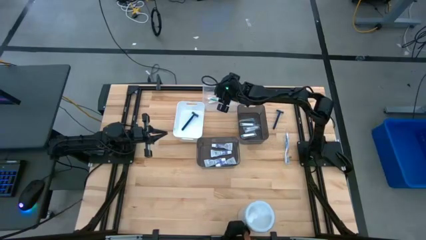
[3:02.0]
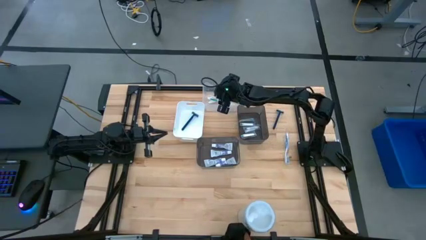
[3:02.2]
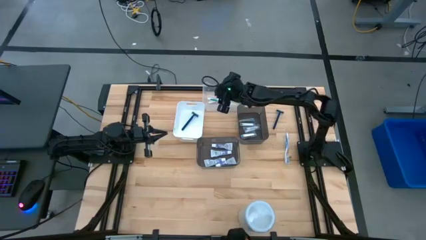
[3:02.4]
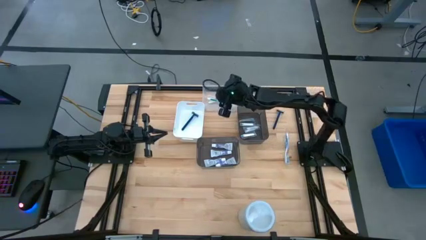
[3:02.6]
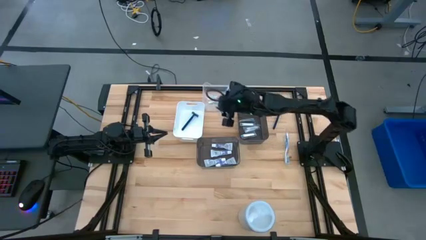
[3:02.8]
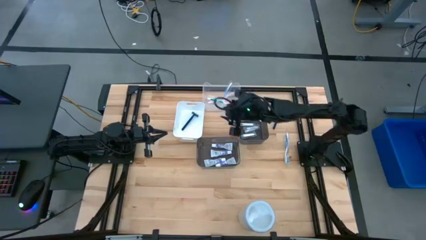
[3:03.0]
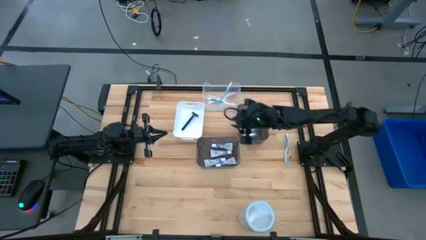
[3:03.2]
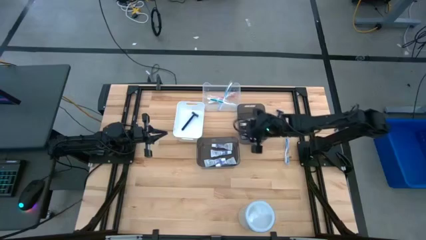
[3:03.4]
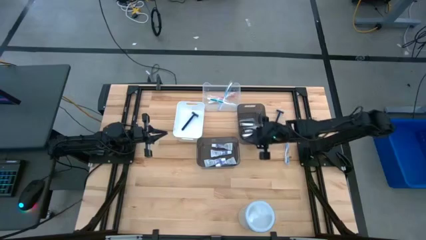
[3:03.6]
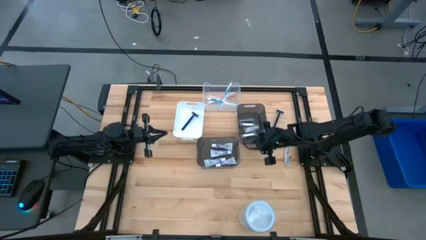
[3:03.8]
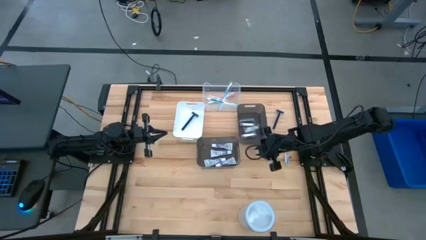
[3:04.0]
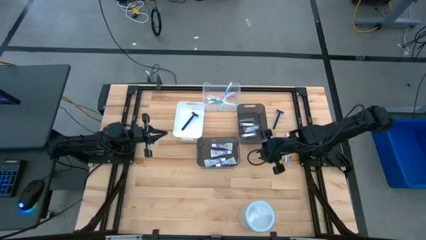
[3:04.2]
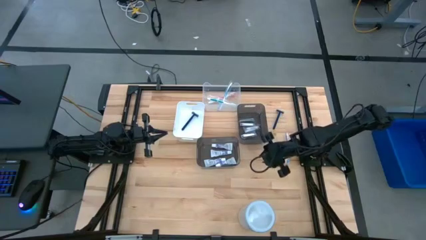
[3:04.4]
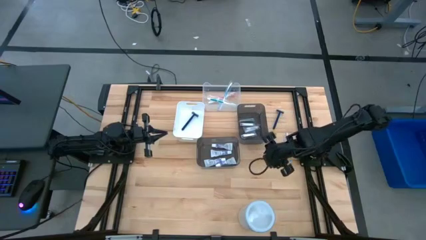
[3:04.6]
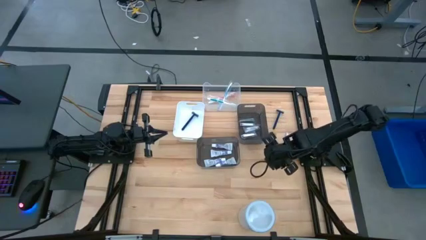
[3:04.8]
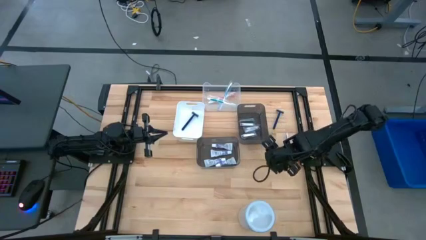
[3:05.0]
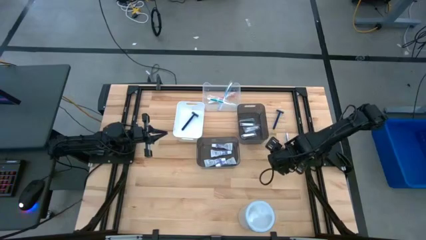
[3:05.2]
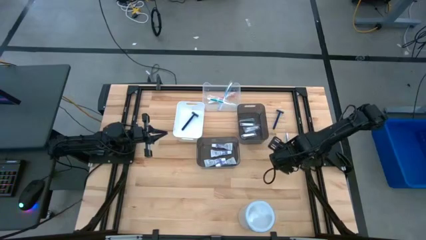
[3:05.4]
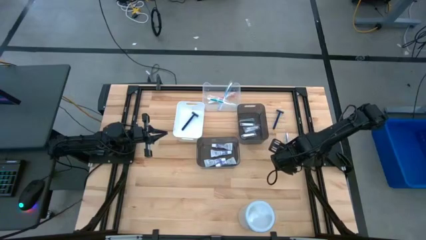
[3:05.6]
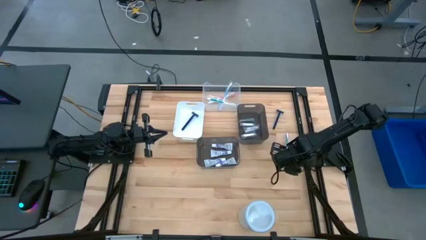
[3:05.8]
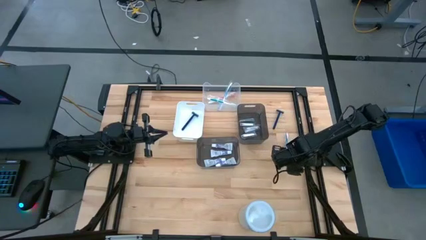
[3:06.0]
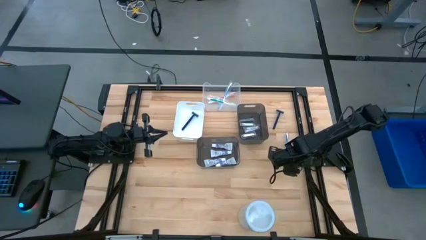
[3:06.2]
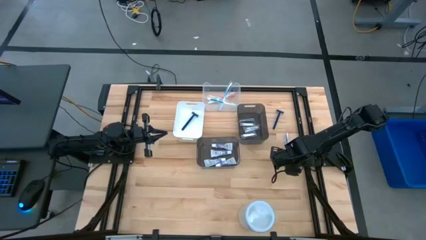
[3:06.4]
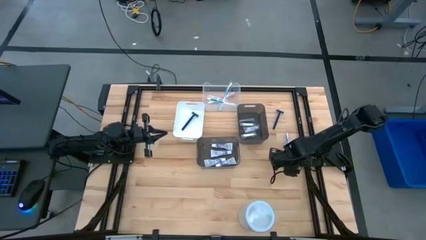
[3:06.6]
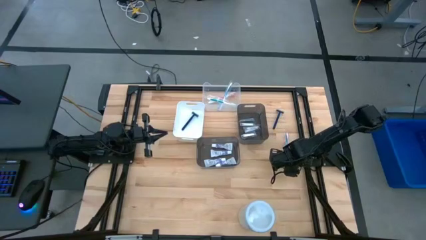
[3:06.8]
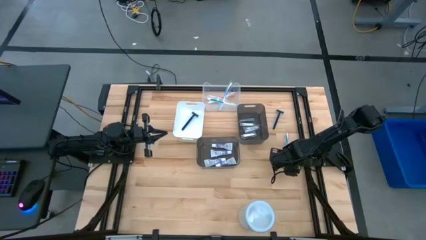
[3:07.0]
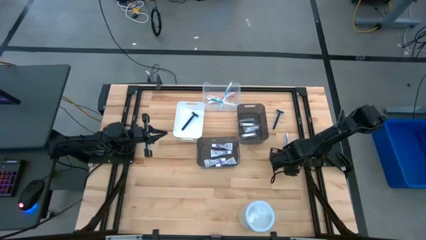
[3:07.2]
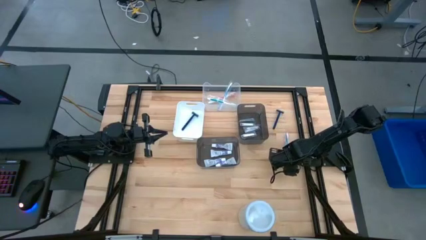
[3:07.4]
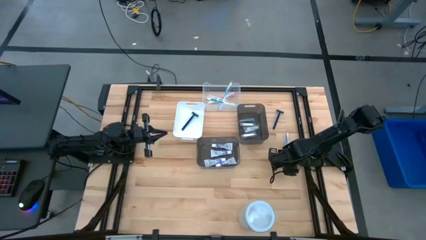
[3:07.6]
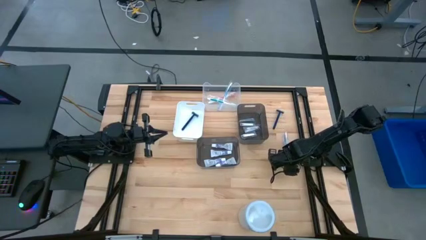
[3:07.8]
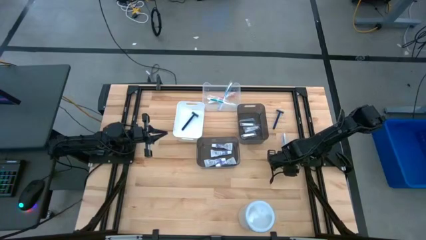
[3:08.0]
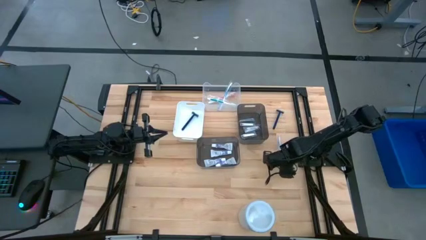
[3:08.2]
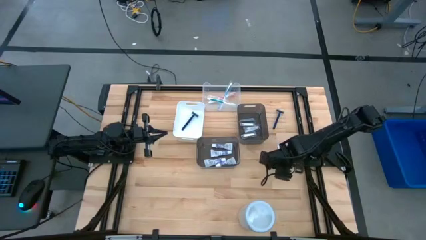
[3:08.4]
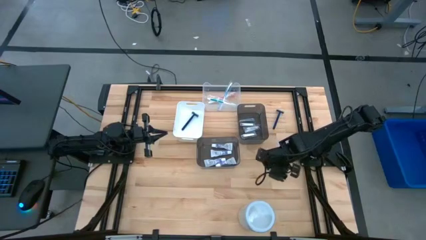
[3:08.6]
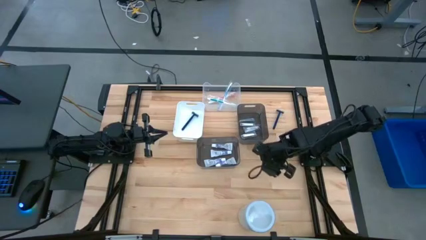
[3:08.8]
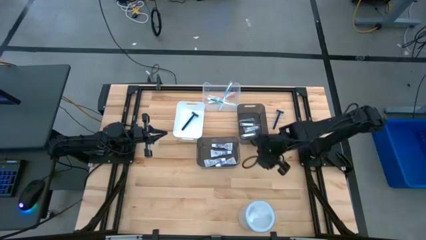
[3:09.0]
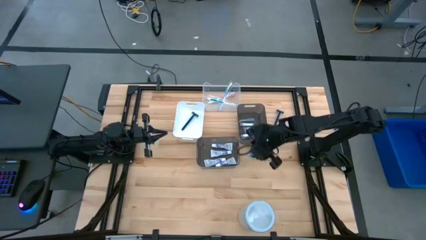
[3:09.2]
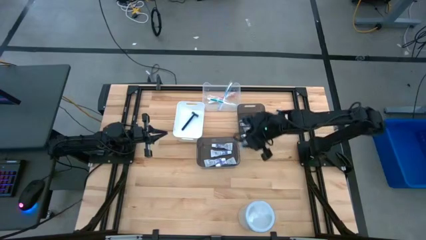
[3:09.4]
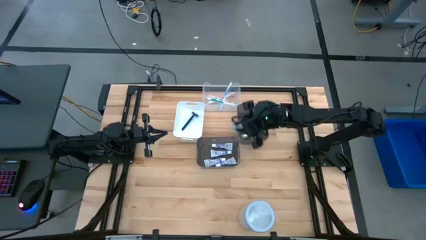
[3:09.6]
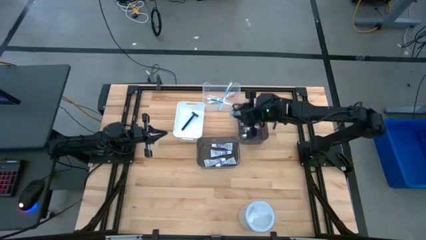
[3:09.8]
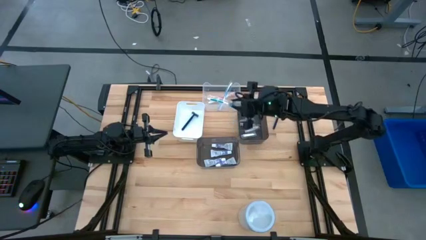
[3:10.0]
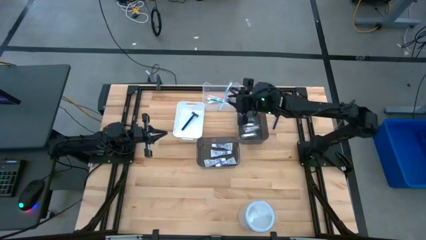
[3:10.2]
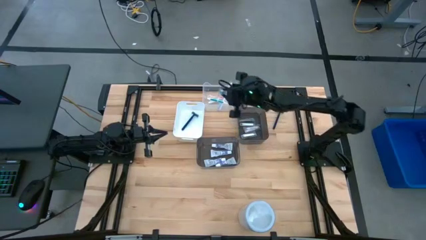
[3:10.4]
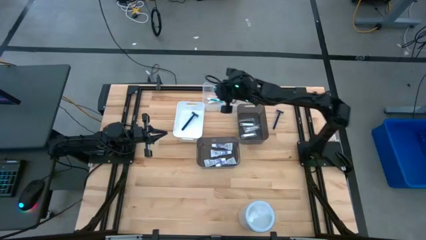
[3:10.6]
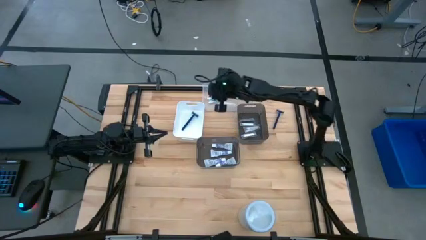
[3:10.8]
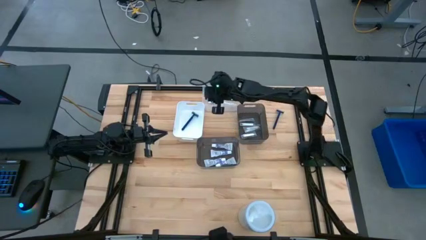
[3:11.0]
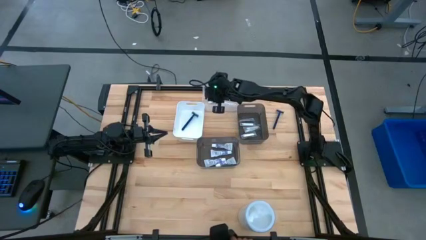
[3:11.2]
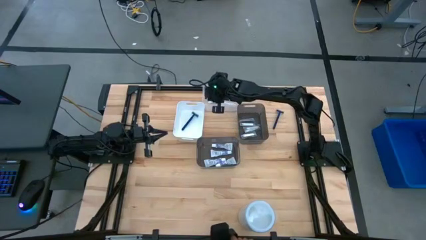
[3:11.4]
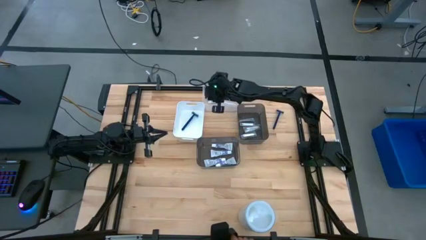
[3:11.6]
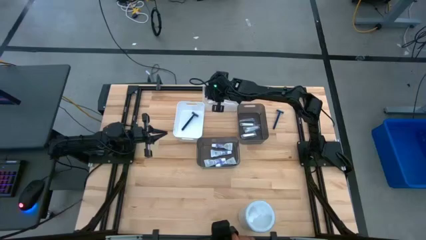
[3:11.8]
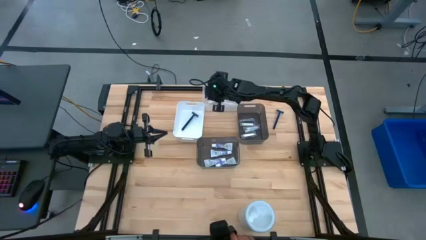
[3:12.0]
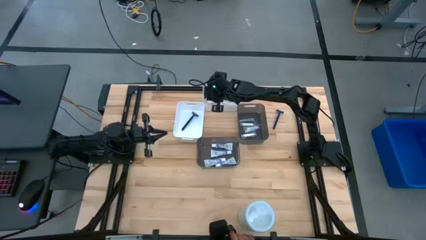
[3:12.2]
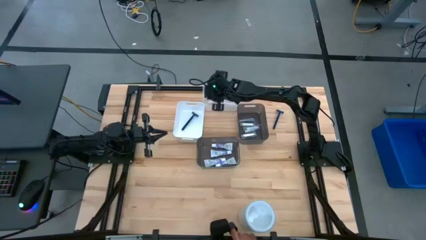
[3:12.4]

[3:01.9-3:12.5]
Task: Pick & Place Travel size toiletries
Put the blue toothbrush into the transparent bin
